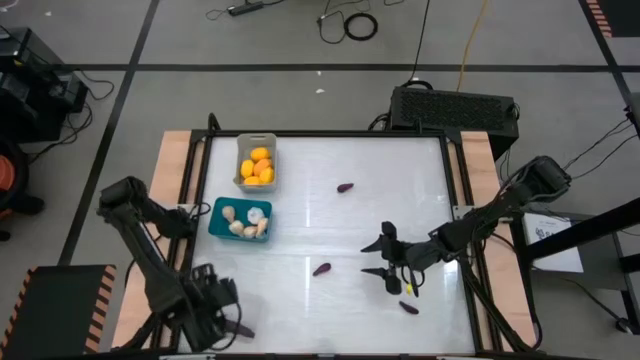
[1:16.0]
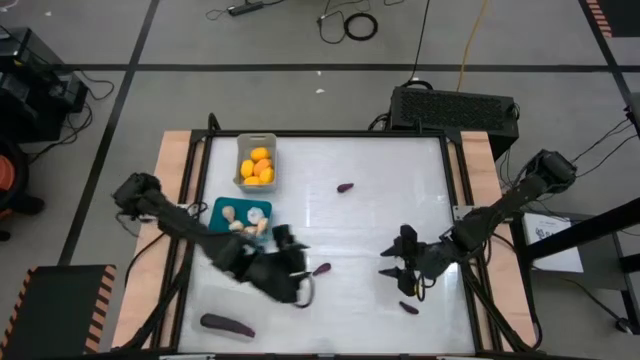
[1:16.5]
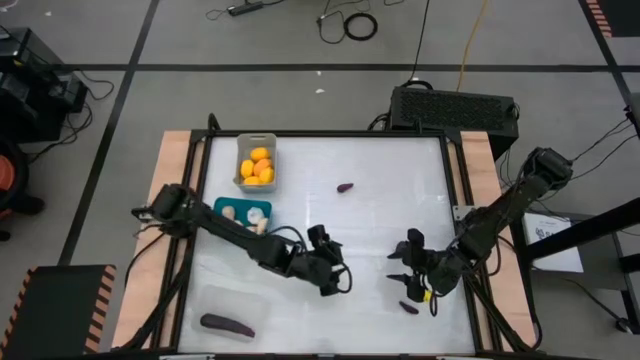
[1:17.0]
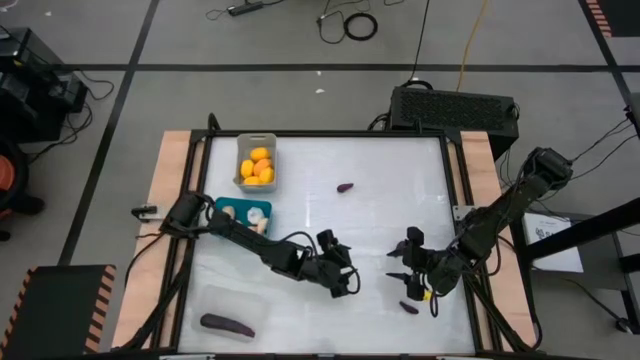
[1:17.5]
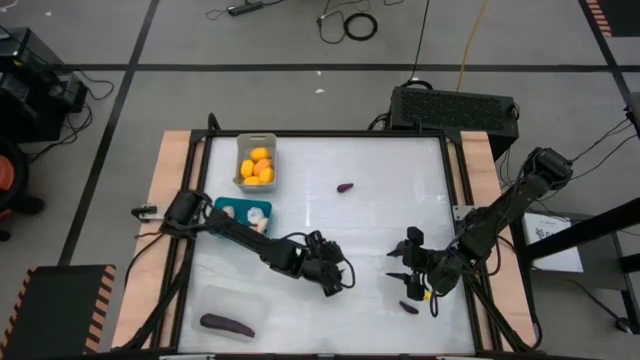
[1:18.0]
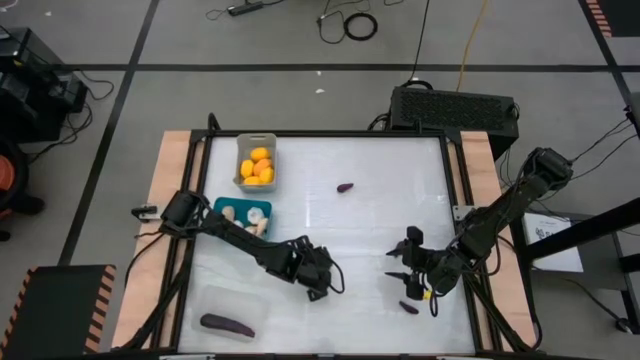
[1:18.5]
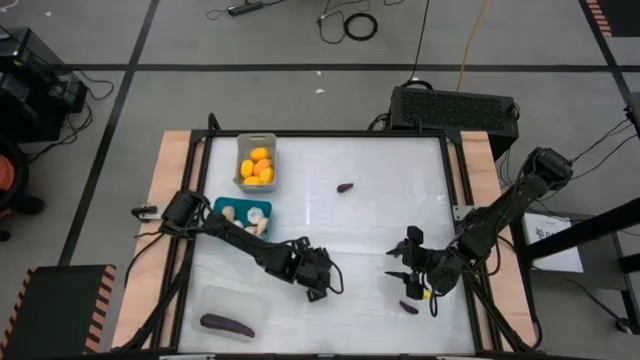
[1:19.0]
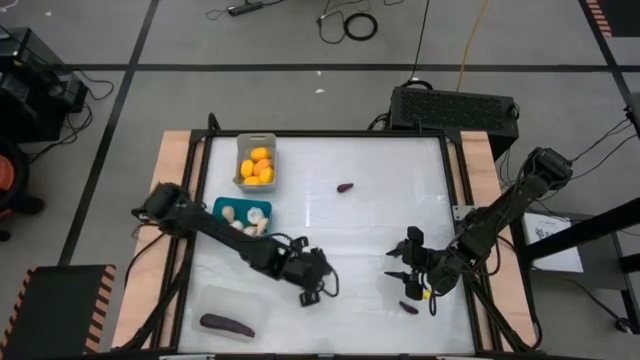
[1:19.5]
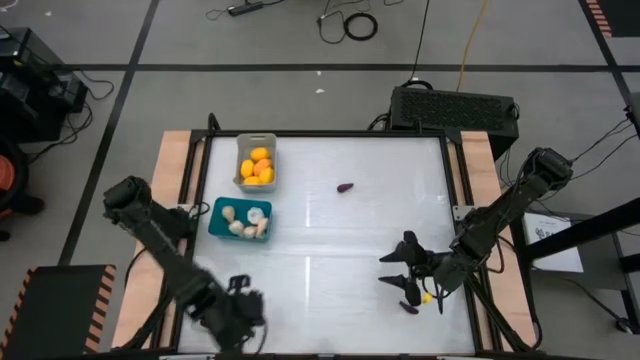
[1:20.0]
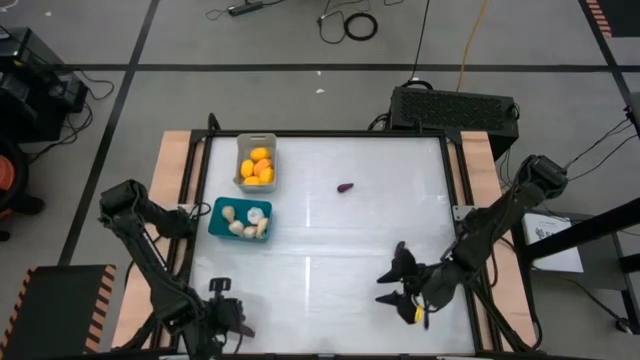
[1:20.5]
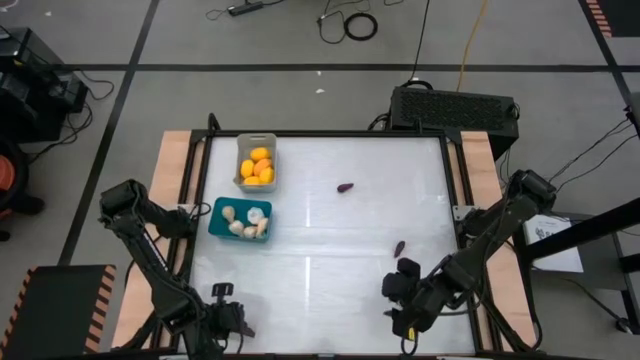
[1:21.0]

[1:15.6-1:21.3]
Task: Sort produce into baskets
Put the purple eggplant into the transparent bin

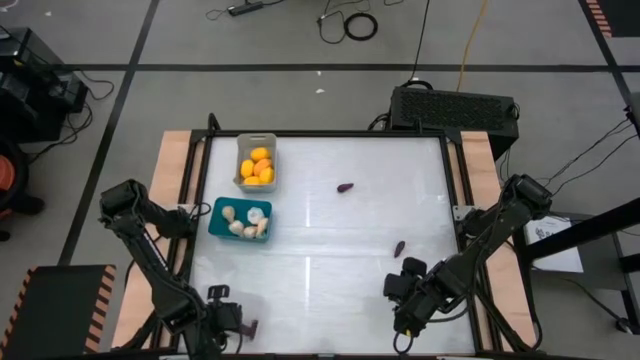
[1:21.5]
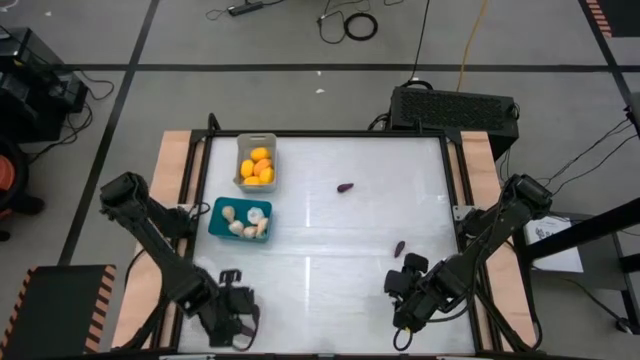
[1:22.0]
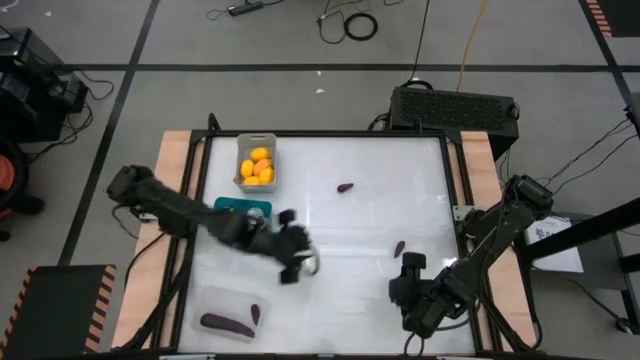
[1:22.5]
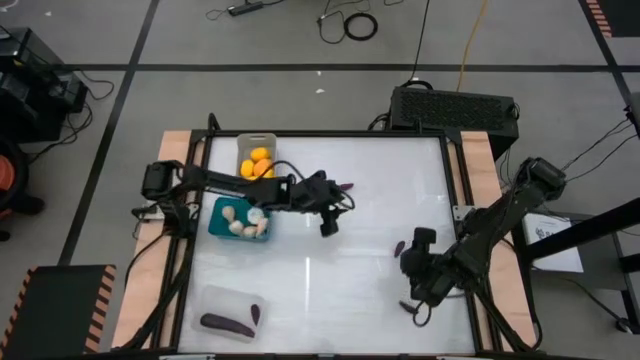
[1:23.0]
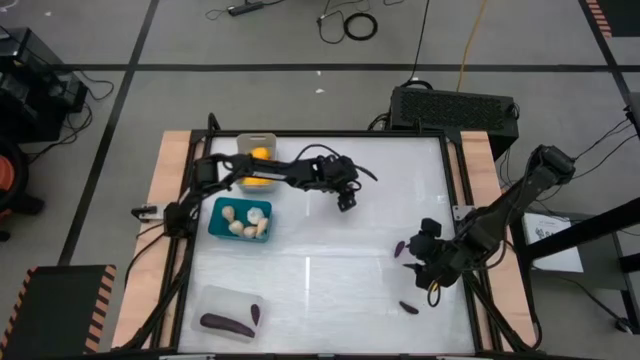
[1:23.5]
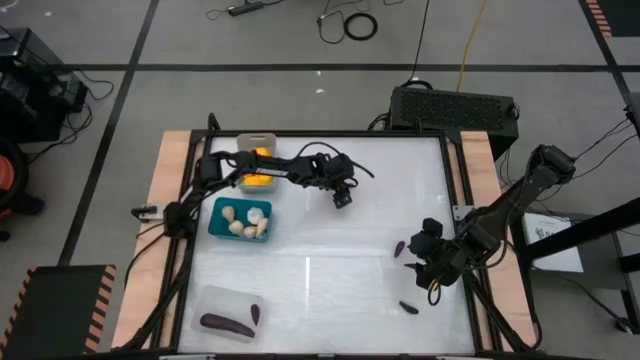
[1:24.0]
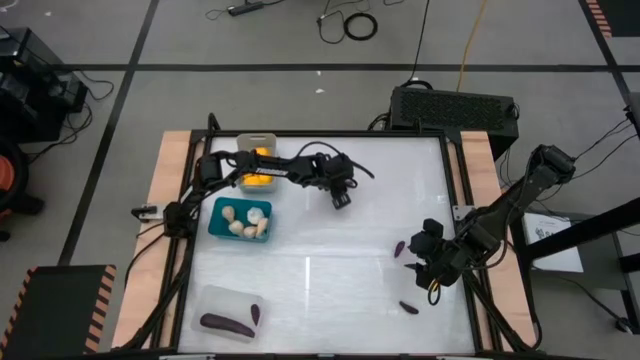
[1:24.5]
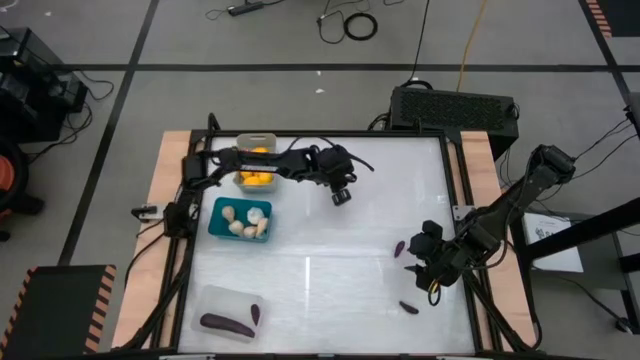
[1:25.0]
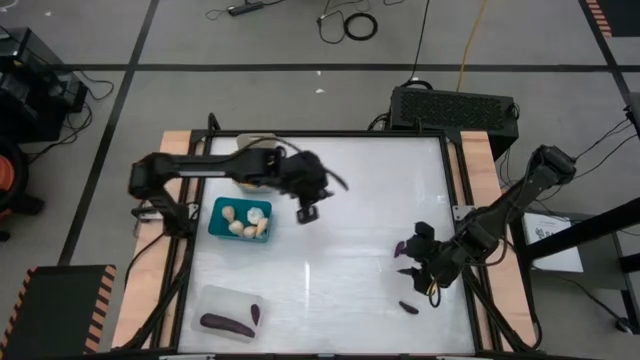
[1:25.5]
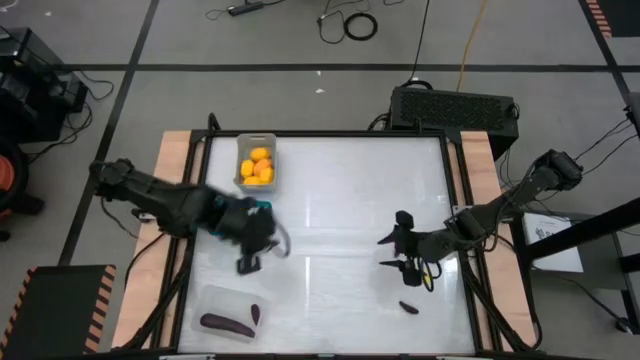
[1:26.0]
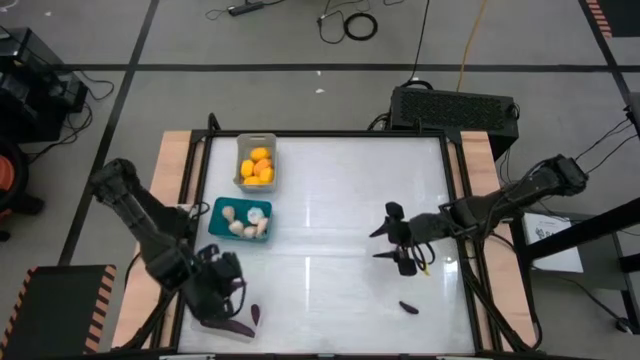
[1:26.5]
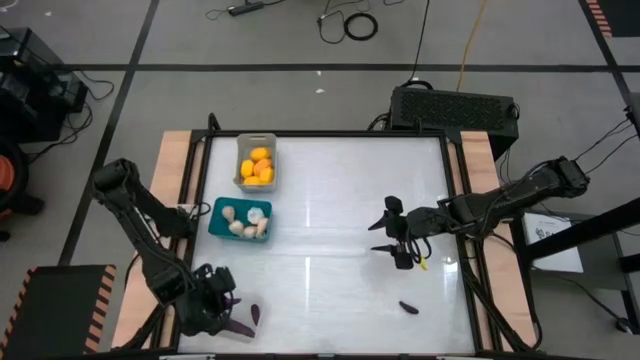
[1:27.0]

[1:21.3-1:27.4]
Put the purple eggplant into the transparent bin

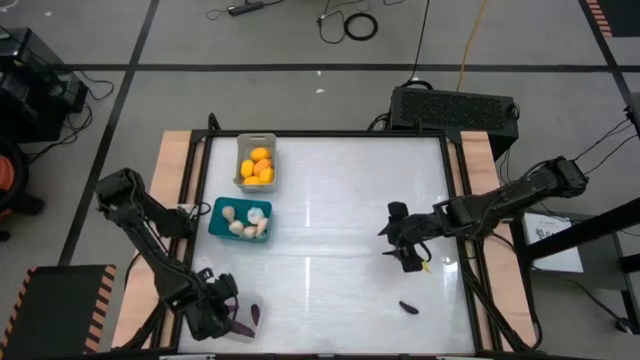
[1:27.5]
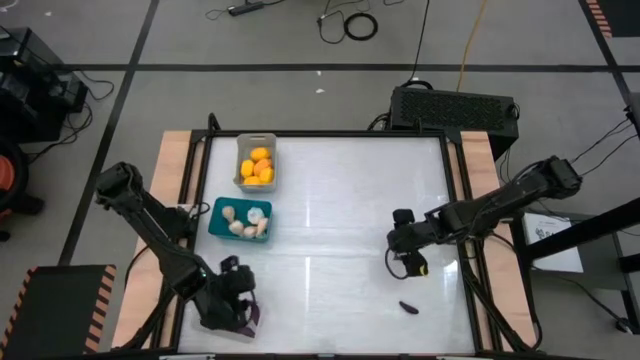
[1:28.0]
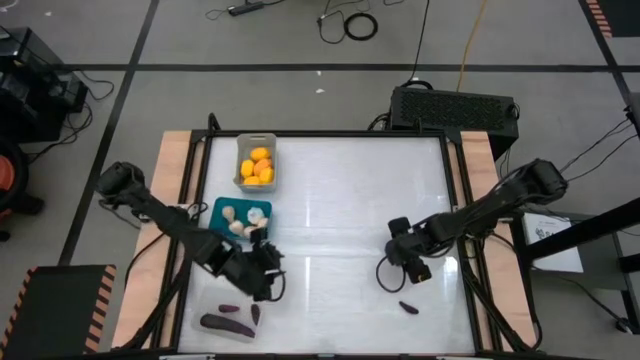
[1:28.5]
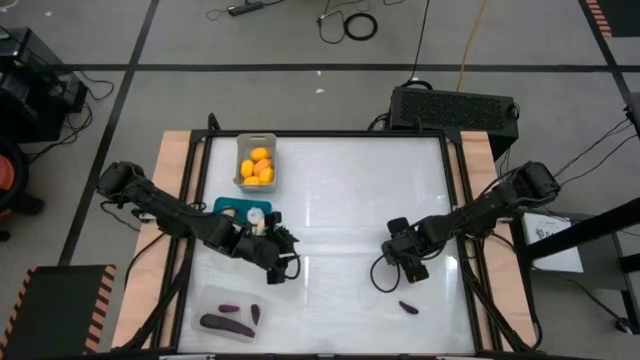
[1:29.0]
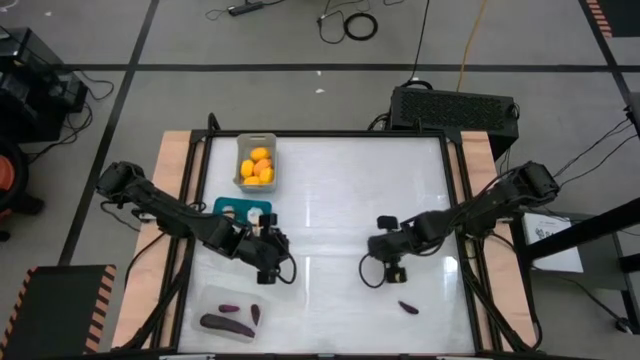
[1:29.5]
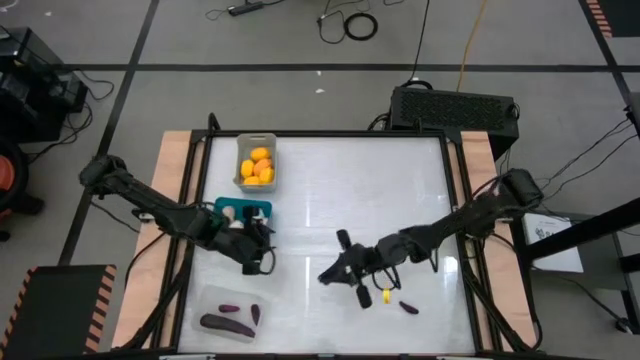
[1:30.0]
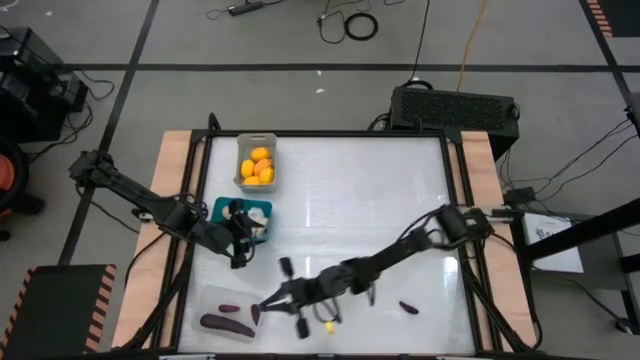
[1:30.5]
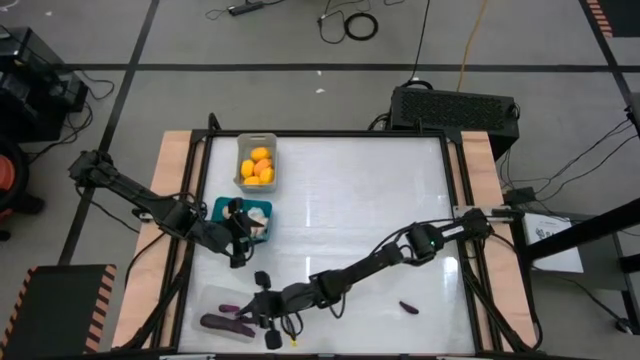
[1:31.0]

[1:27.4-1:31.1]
Put the purple eggplant into the transparent bin

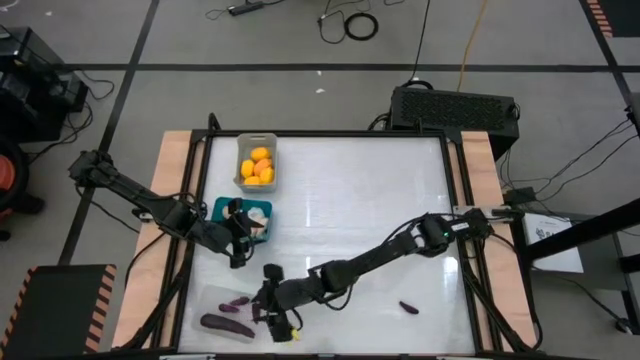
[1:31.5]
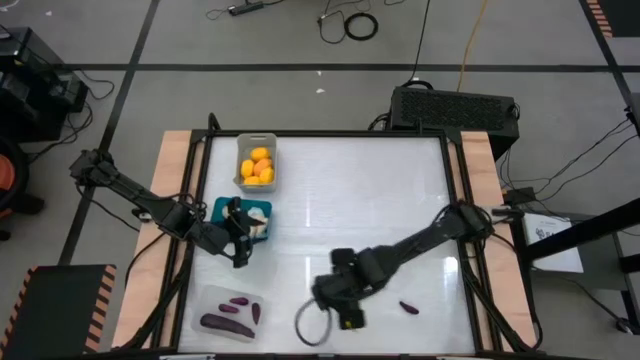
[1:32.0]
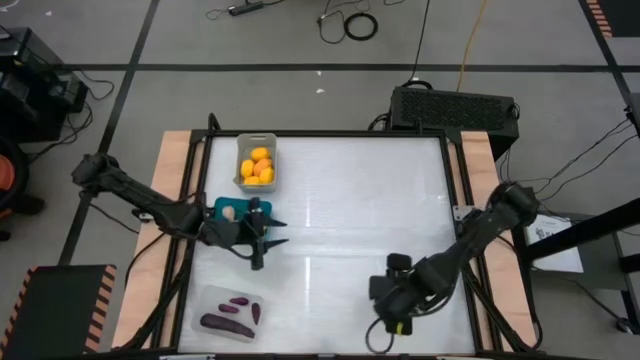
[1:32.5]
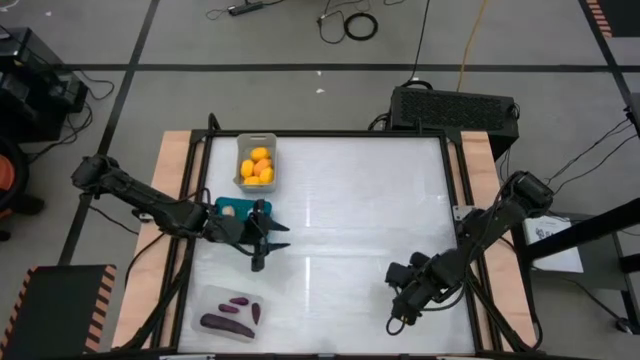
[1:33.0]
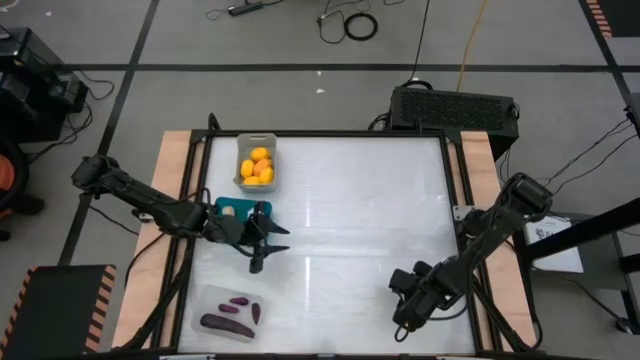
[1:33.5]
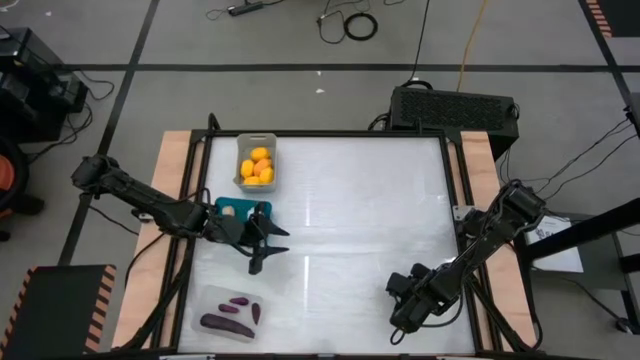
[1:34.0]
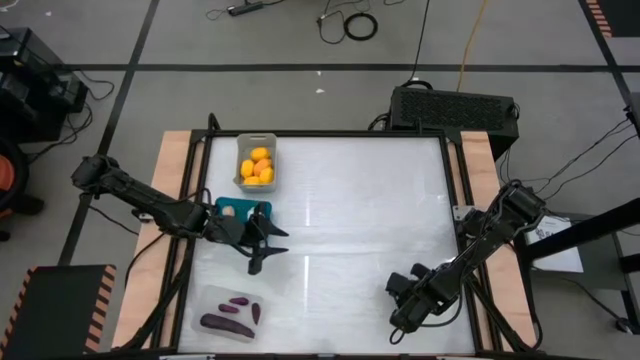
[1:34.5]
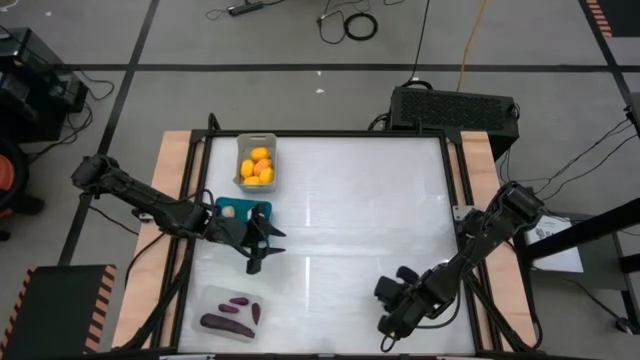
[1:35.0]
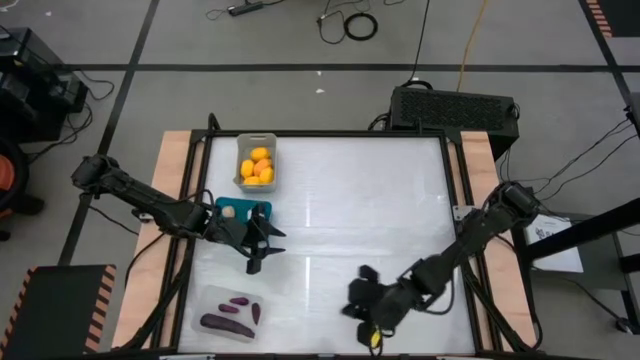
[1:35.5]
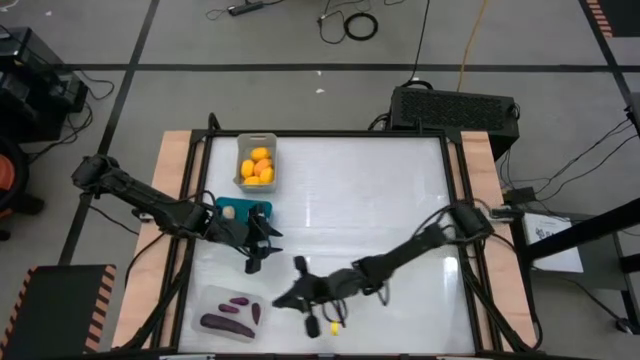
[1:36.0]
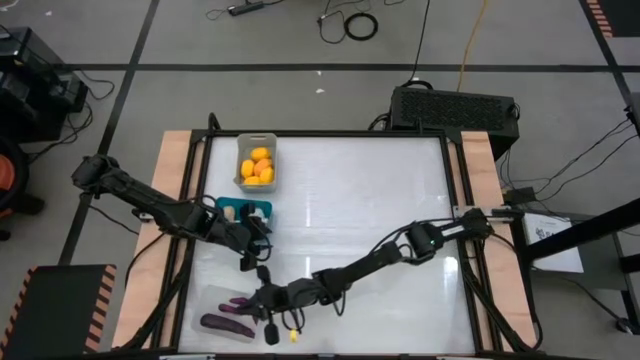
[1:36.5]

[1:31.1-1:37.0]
Put the purple eggplant into the transparent bin
